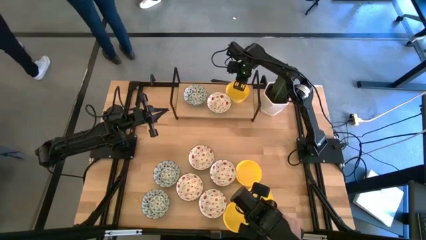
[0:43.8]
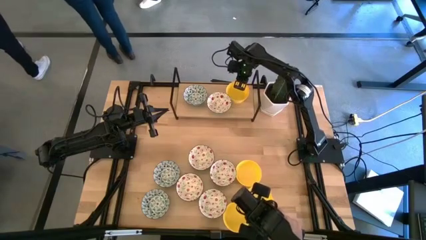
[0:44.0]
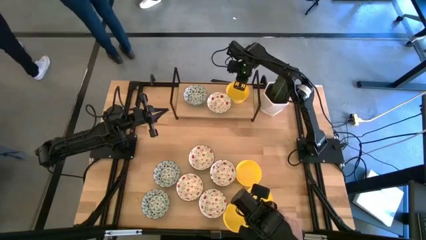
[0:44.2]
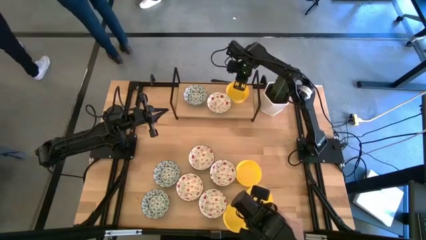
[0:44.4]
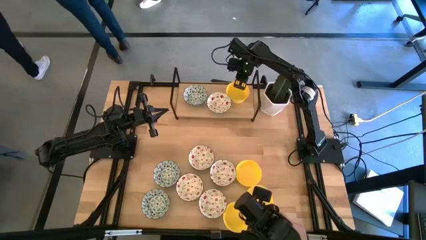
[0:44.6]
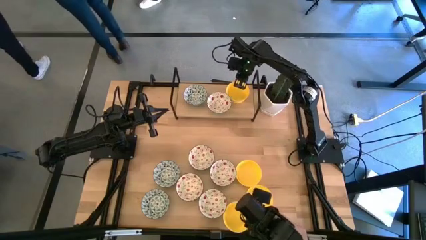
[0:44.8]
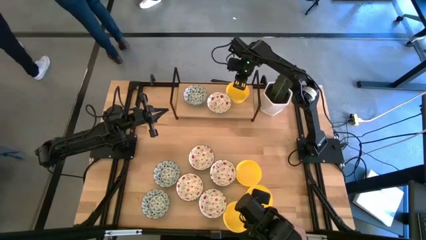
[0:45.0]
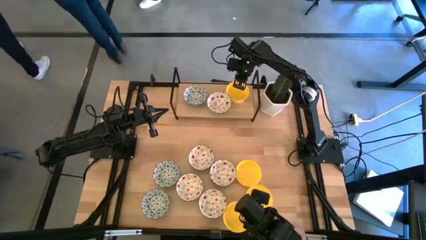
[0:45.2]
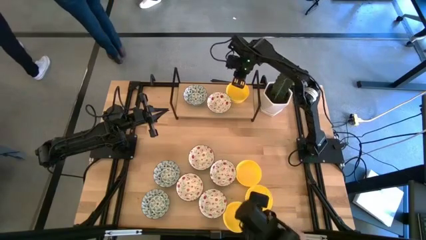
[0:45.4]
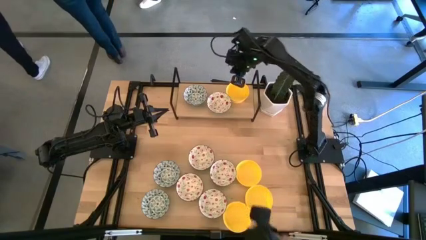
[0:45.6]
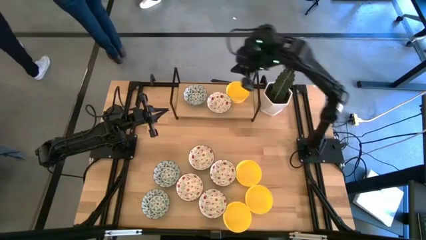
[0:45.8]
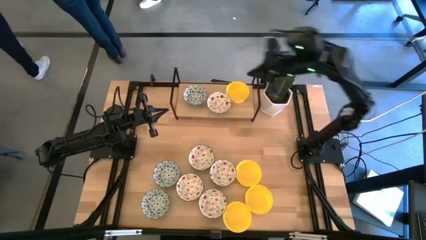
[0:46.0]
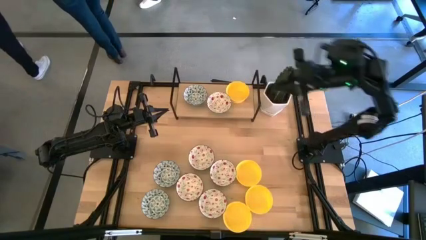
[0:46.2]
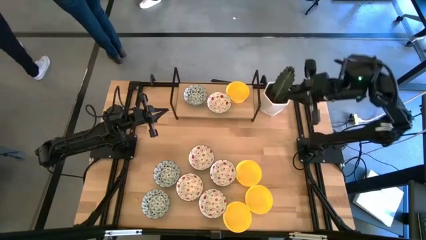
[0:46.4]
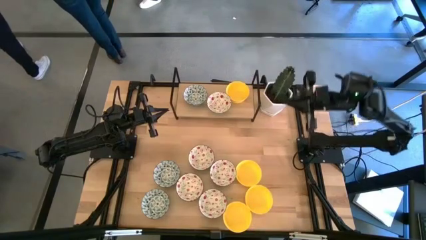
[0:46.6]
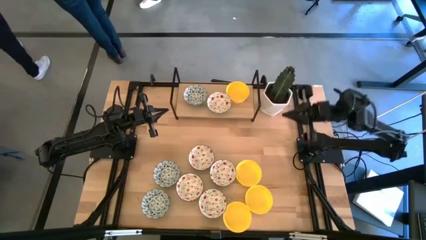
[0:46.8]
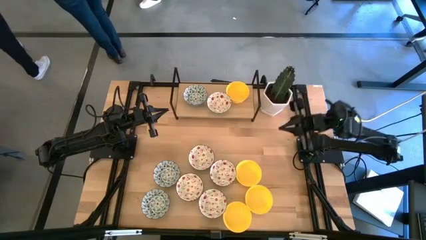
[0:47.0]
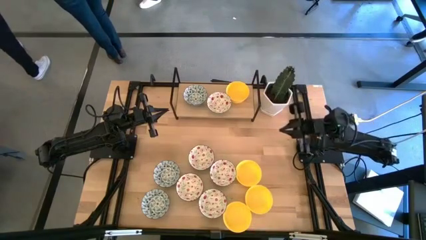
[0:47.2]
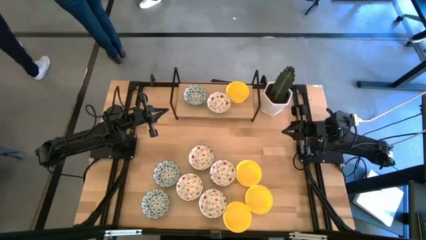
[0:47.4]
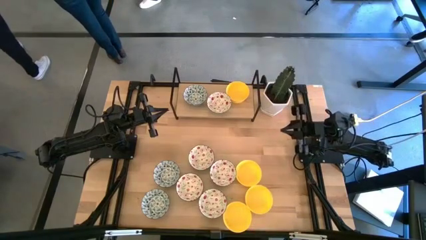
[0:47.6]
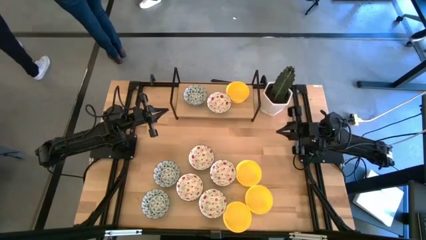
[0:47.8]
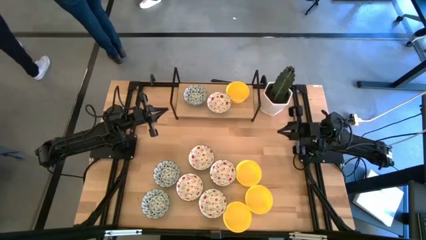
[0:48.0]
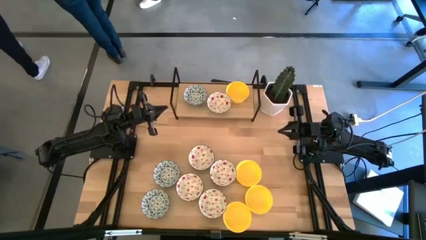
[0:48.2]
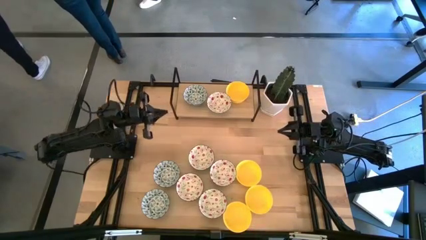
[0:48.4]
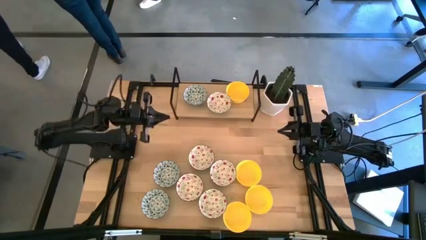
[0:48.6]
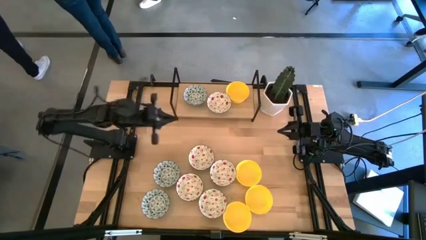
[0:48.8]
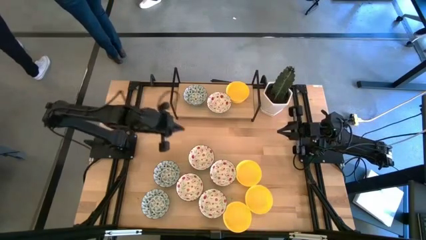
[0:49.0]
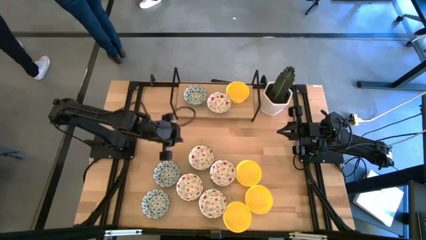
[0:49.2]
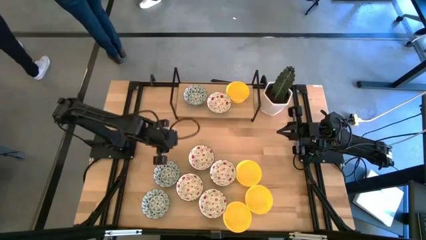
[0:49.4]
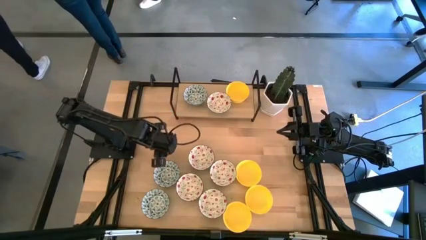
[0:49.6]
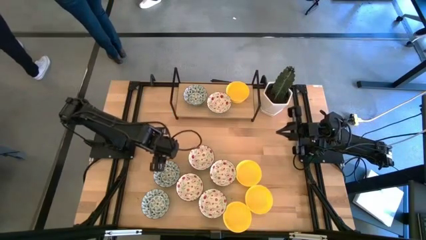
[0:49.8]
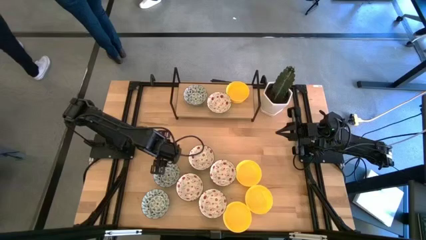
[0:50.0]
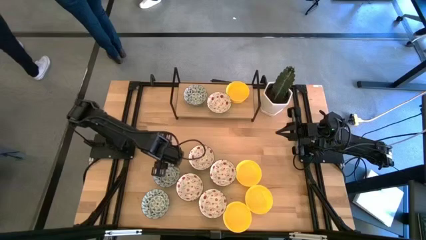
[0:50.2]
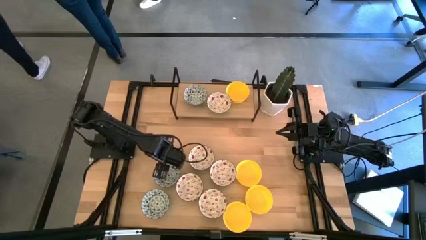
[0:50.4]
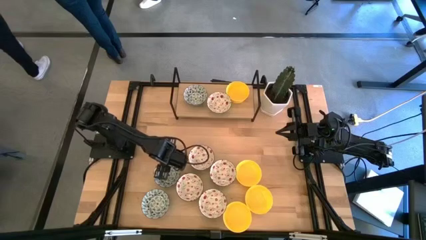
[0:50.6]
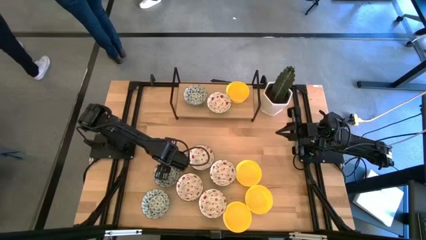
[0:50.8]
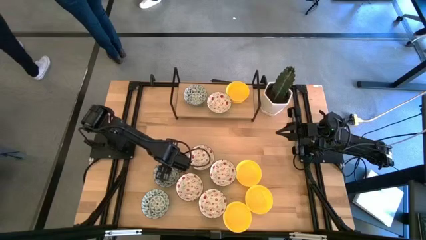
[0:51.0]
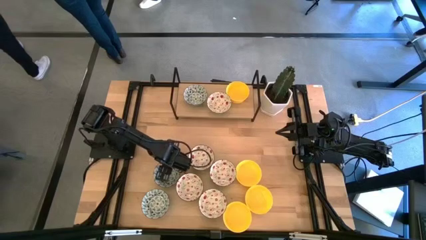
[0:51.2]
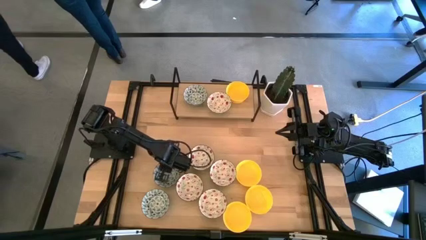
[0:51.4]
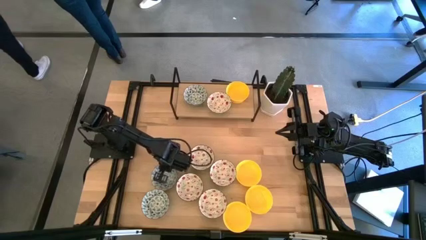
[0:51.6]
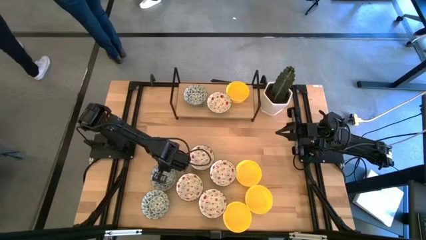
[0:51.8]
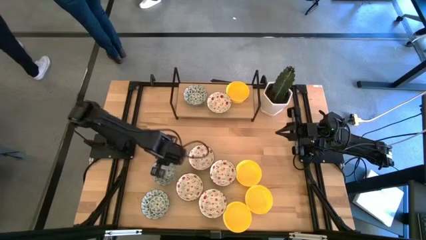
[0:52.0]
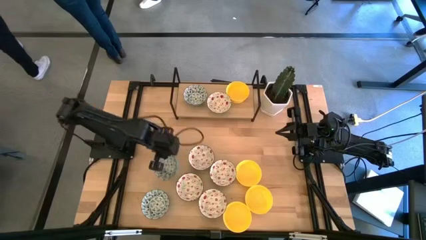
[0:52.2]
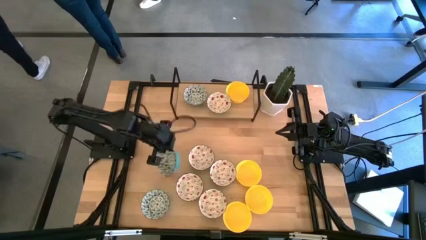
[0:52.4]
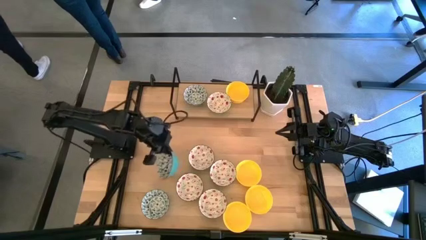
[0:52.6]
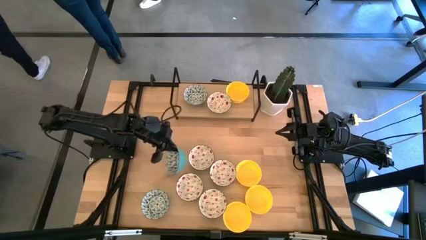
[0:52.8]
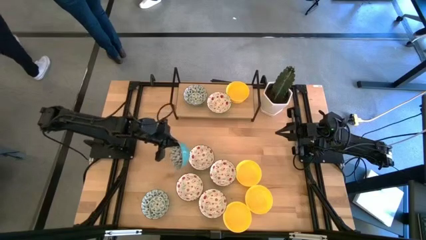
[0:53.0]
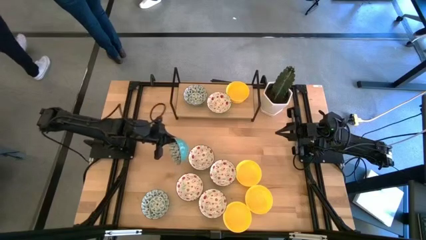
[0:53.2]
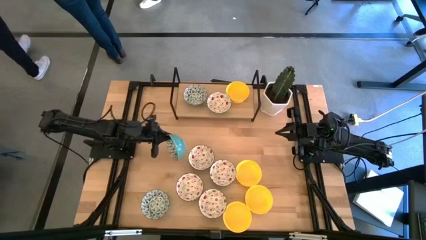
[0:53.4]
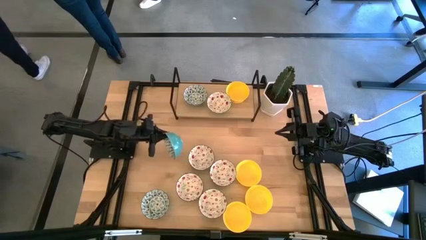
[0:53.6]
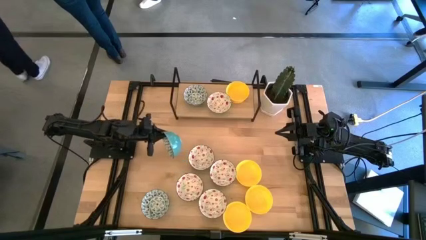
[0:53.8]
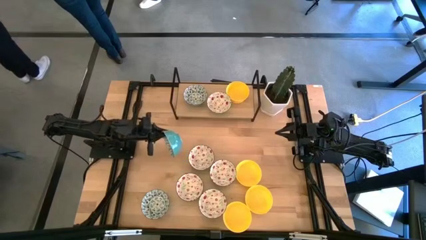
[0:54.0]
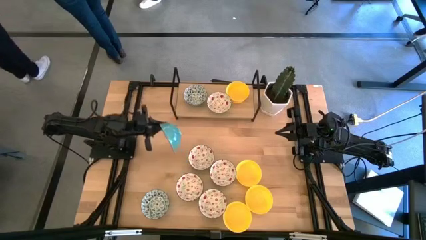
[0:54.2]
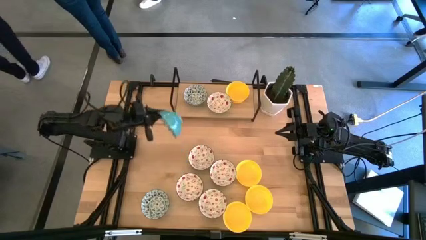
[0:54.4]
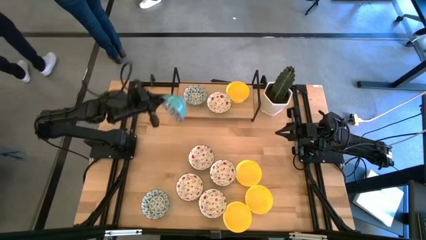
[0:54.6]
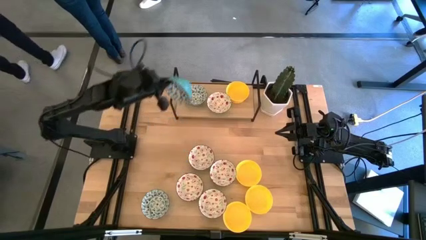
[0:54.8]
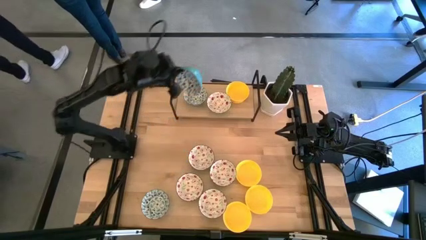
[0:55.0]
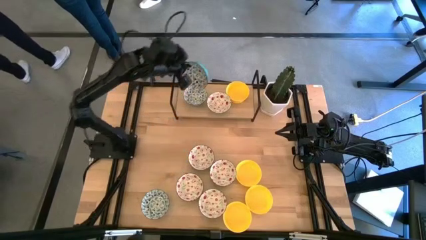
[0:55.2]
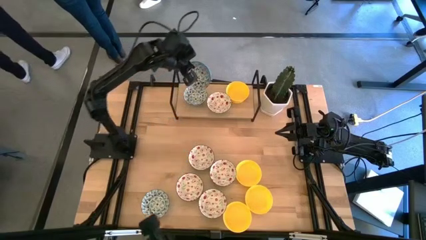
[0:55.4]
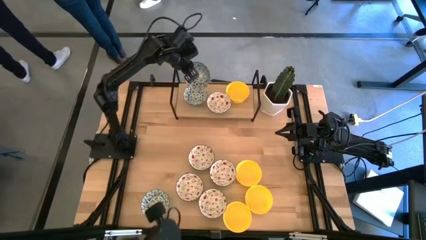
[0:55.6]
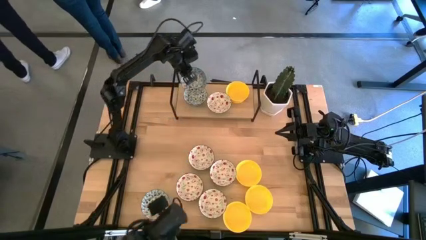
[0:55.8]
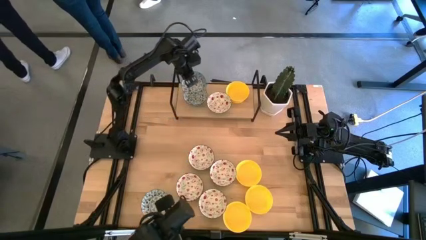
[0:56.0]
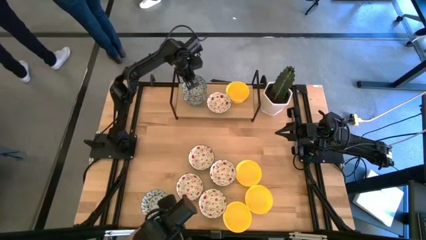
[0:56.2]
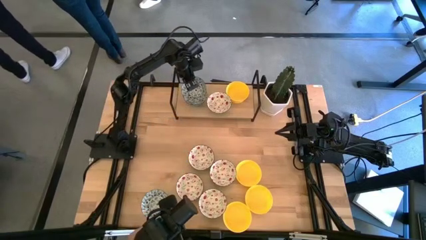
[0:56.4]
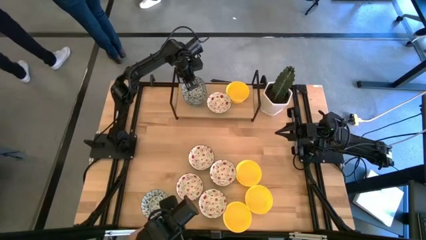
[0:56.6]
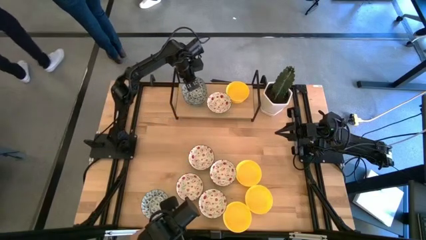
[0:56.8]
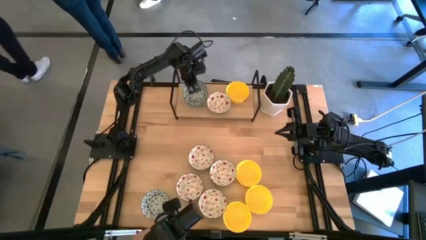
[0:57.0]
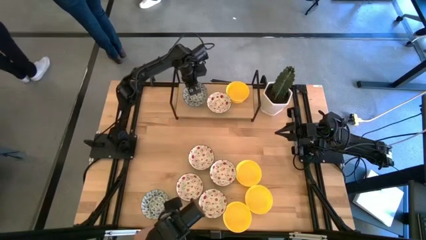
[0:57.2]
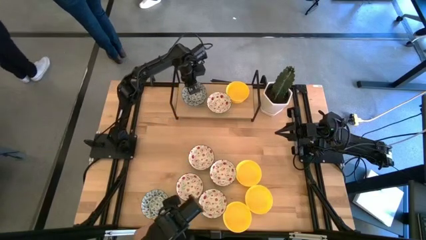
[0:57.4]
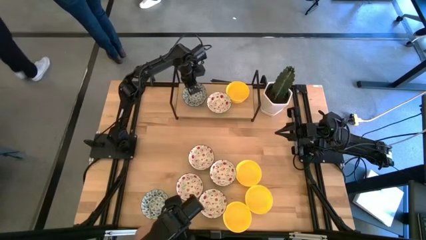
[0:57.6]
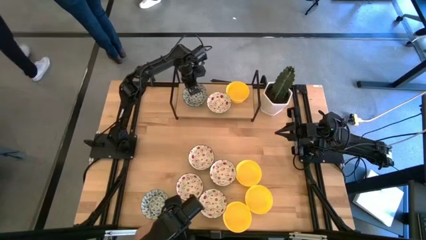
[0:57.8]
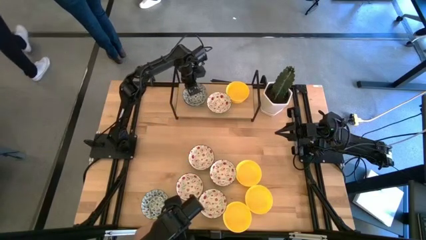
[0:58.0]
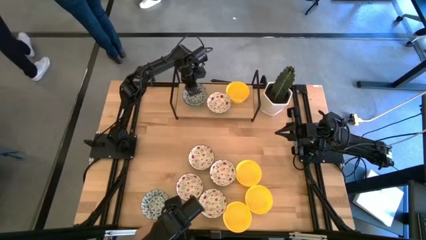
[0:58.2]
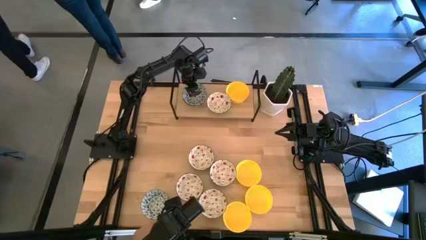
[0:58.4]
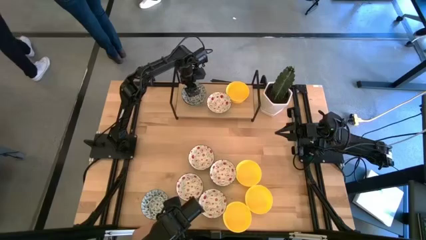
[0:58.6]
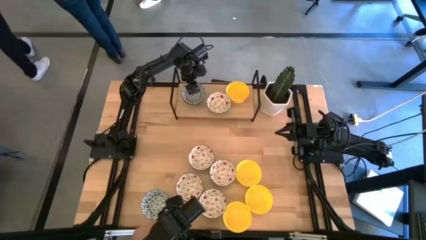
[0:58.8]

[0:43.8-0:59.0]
Task: Pick & Place Mini bowls
Stack the blue patterned bowl on the blue patterned bowl on the shelf

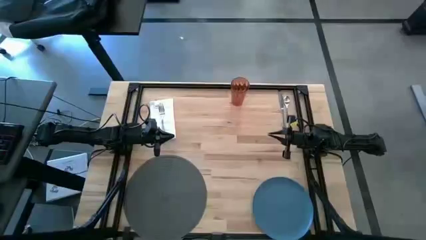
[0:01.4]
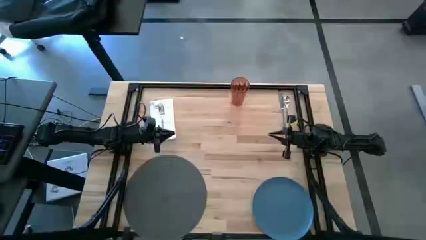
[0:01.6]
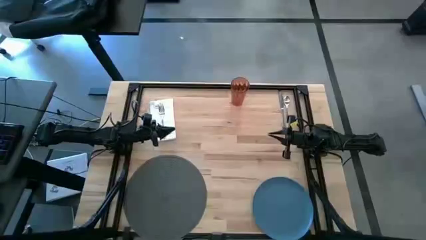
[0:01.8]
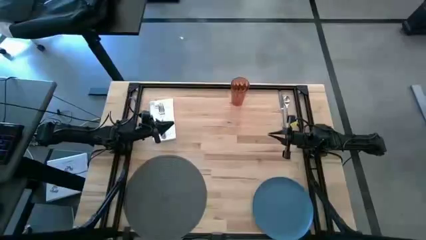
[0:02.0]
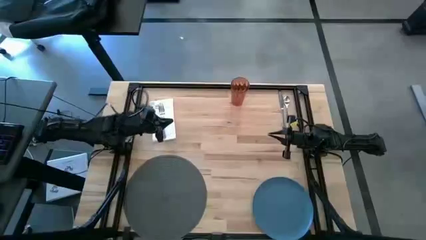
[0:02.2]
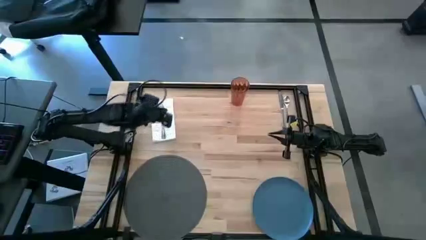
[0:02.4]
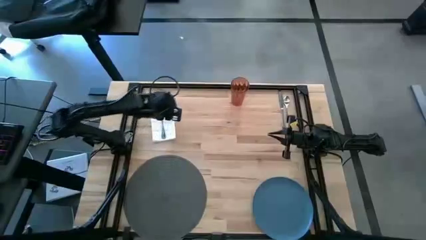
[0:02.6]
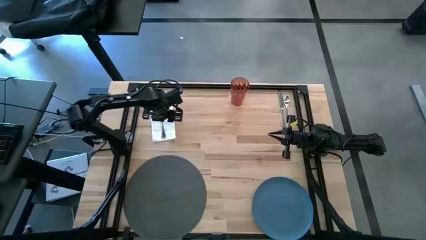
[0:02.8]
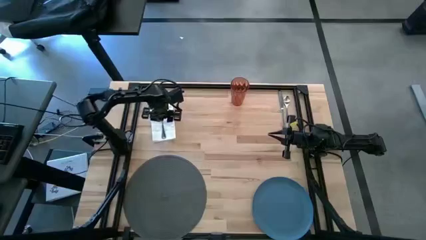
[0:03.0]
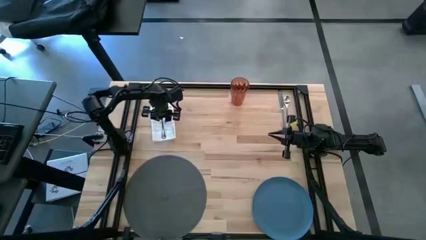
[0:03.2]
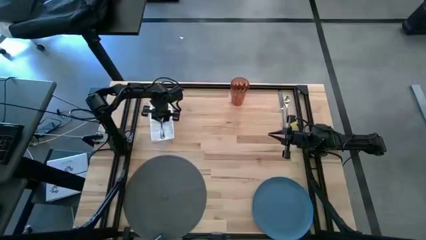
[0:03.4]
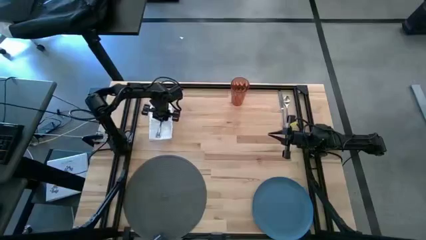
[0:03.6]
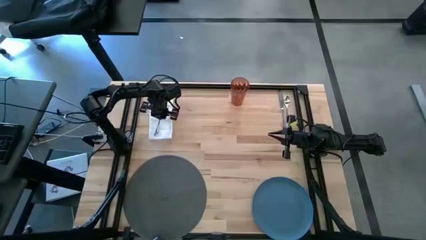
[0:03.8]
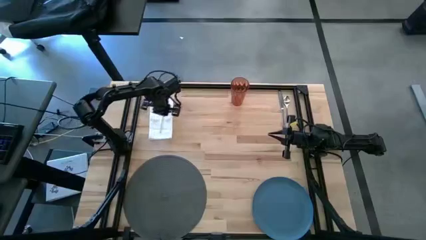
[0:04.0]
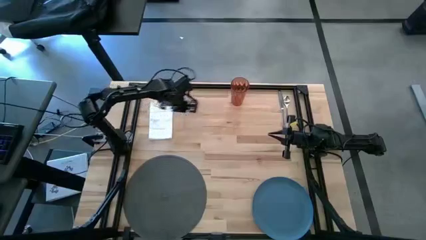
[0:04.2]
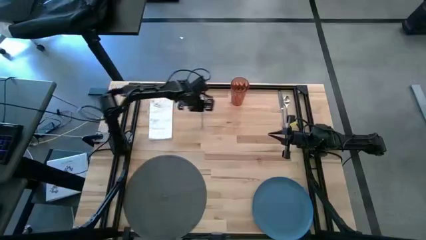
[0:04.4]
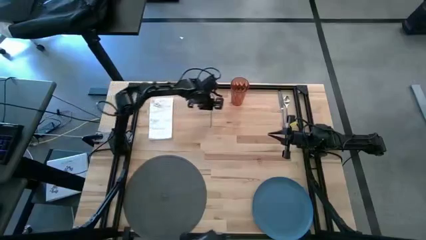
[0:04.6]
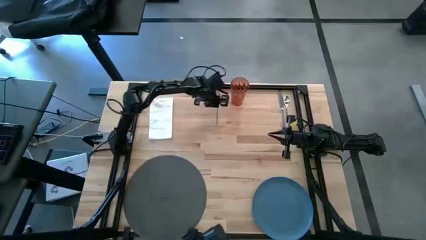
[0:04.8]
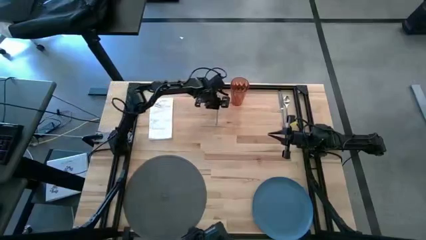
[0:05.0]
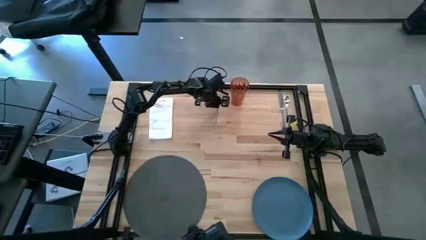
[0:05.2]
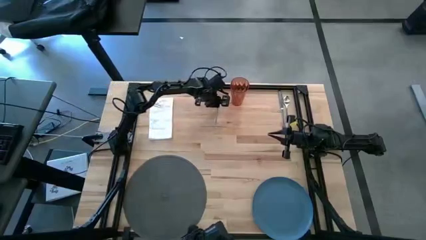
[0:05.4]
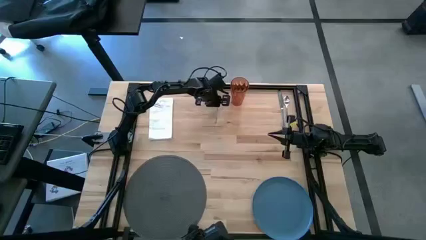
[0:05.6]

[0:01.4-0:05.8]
Task: Set table place
Move the silver fork to the top center of the table
